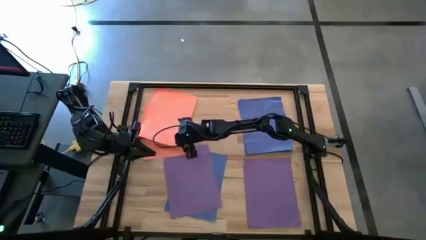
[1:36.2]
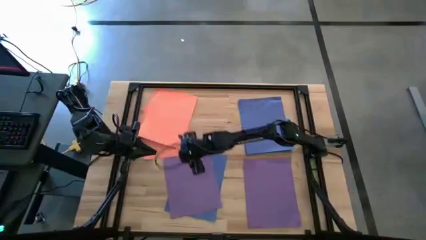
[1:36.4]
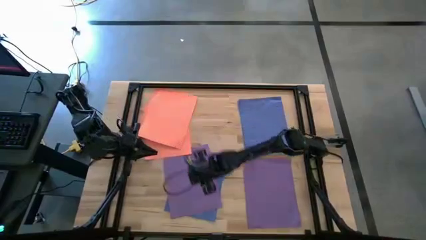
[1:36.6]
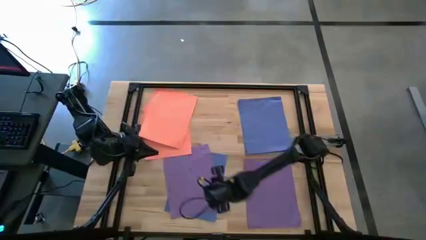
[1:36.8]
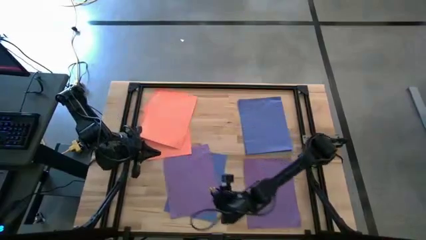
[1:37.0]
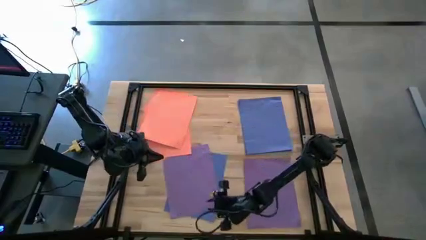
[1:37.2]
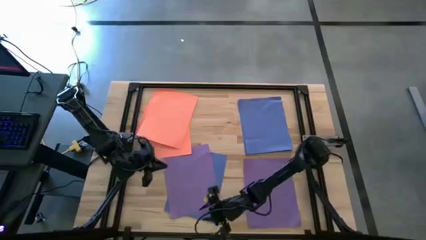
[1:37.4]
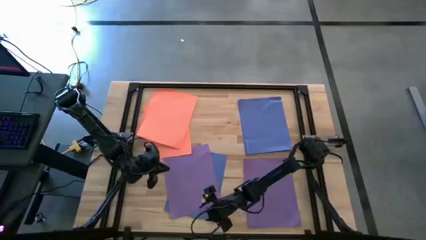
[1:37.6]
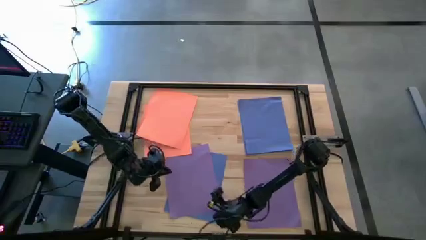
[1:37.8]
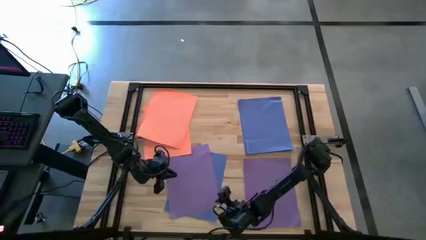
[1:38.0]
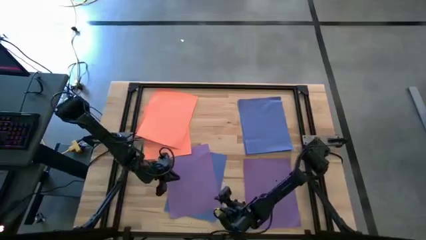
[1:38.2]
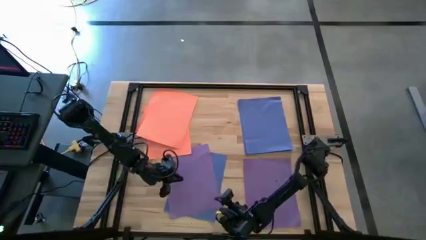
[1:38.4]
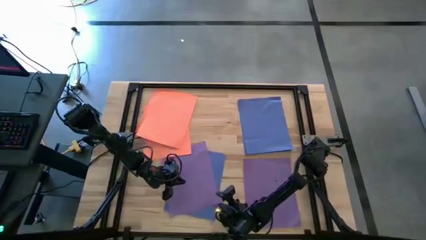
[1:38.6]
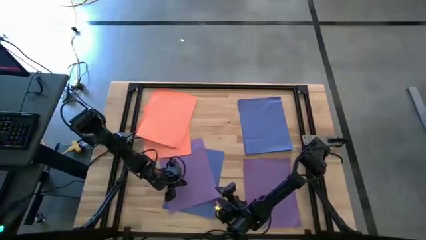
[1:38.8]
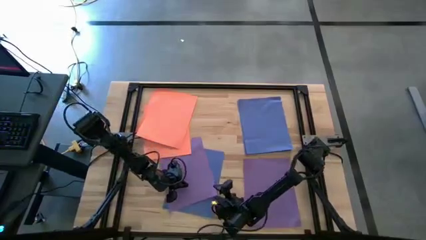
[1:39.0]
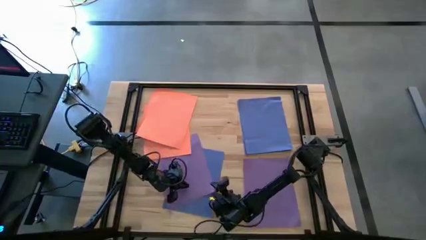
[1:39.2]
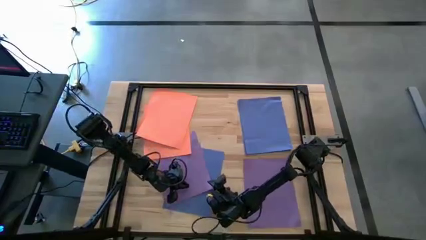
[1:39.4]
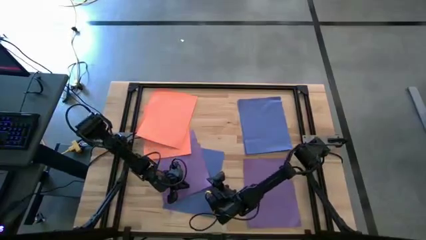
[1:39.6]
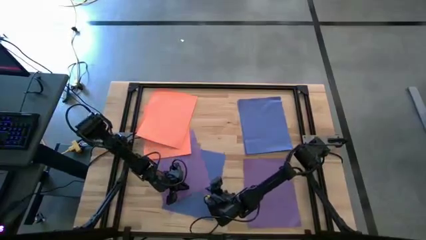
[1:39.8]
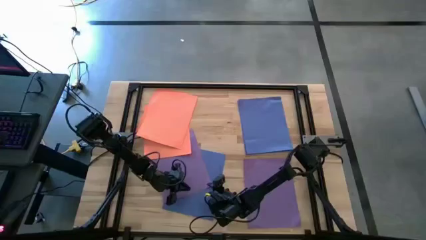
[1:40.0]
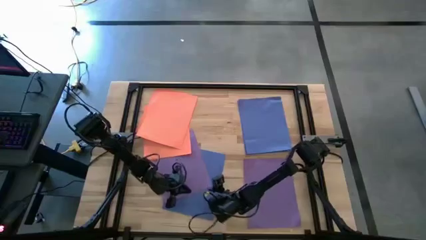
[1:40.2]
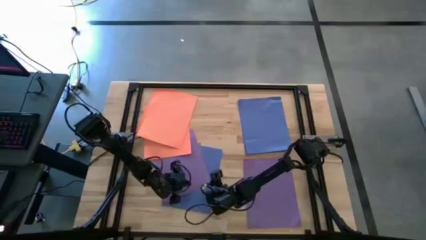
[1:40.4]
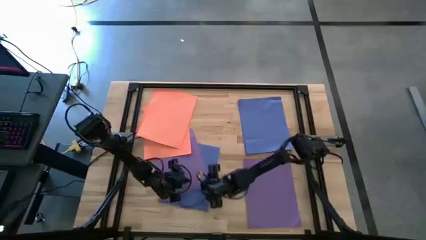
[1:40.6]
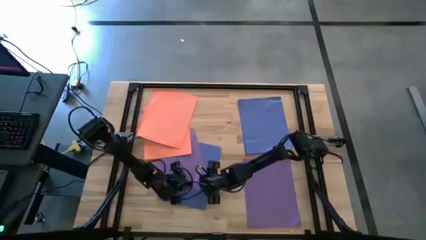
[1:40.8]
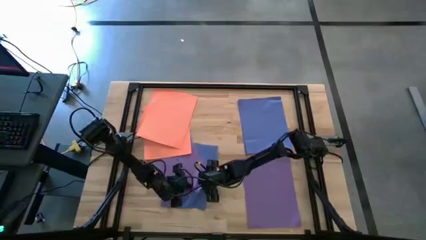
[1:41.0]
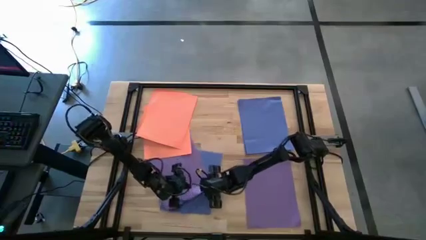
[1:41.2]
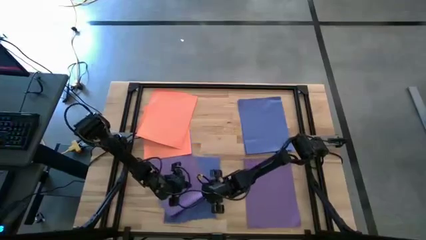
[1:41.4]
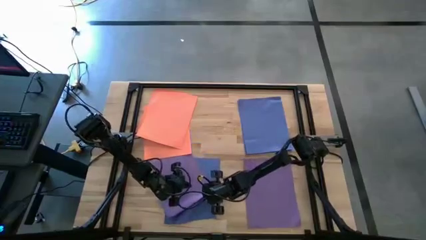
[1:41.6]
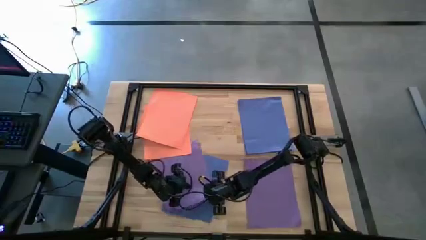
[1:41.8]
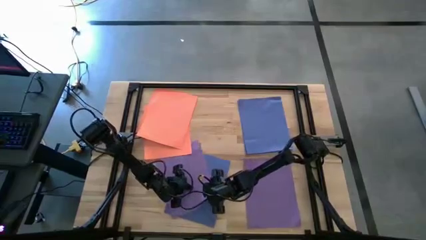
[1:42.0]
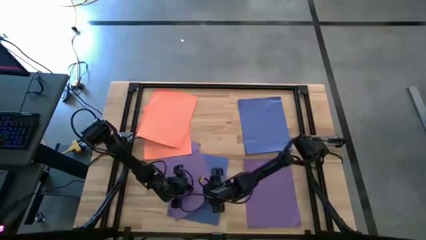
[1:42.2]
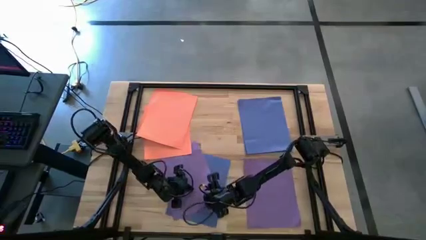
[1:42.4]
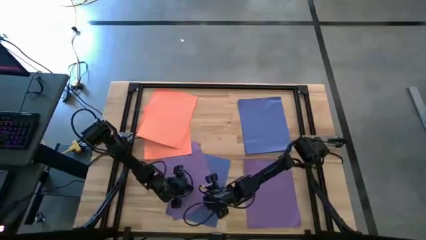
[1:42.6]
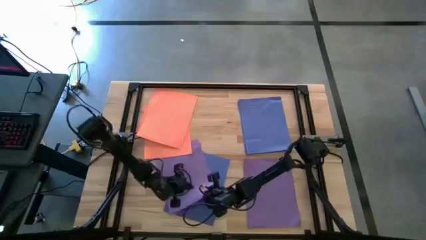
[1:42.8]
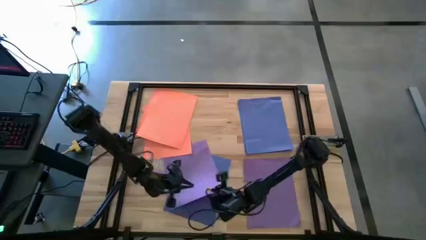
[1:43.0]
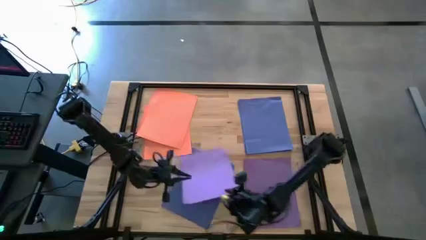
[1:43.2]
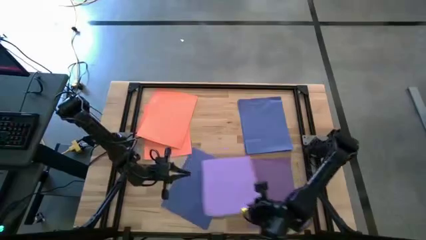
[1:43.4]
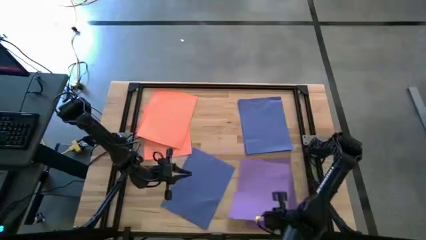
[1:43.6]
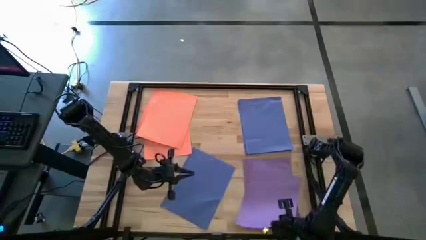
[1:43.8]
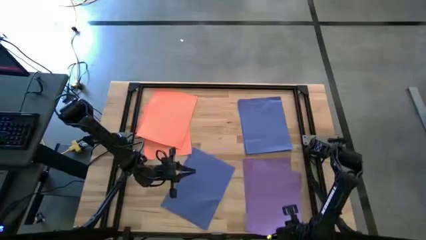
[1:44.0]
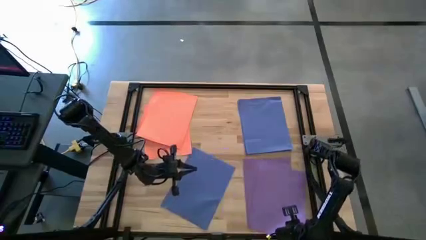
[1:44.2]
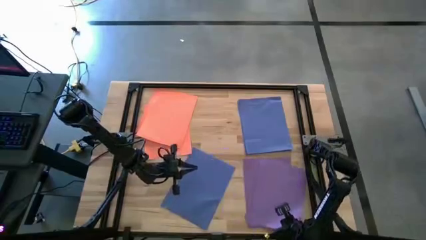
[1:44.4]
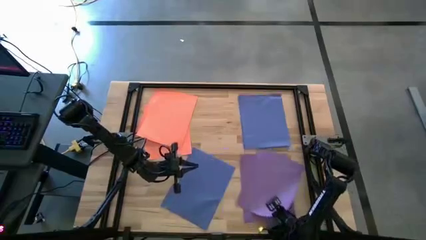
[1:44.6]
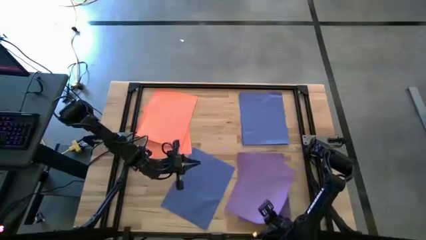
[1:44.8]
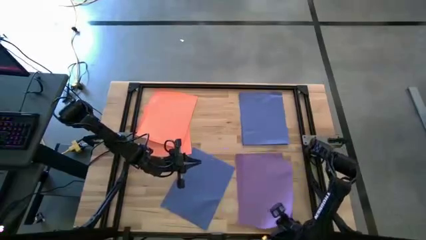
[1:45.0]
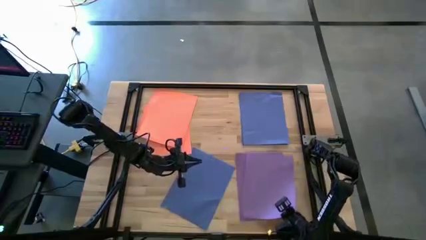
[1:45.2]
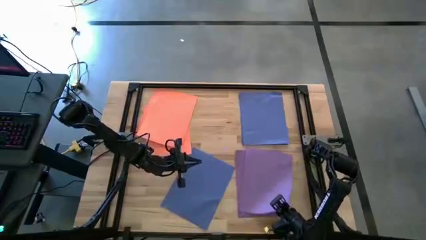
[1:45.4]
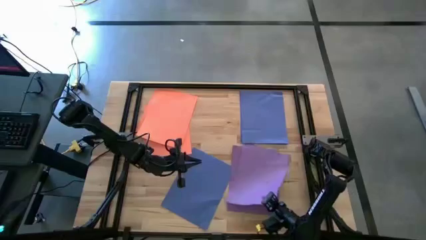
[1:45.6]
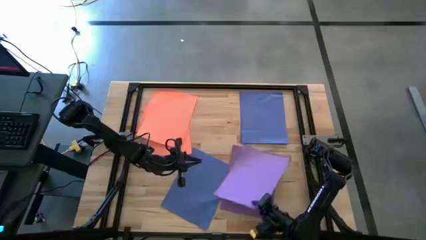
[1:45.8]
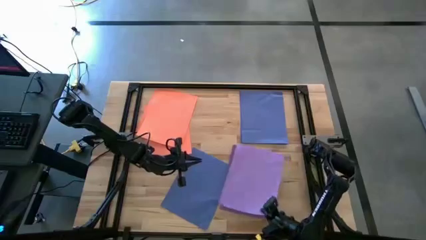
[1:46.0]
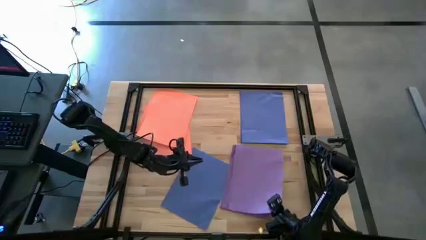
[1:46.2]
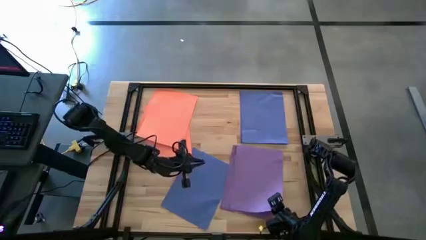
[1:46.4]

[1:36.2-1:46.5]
Task: Organize paper
Stack the purple paper on top of the purple paper

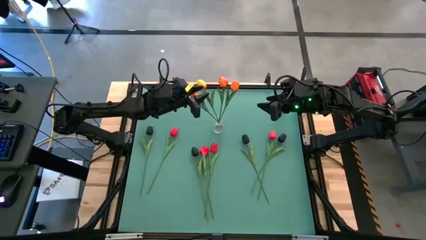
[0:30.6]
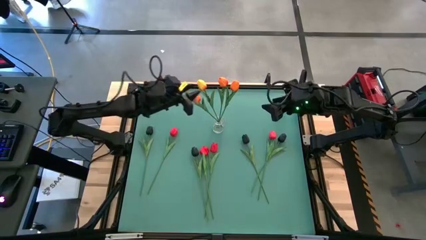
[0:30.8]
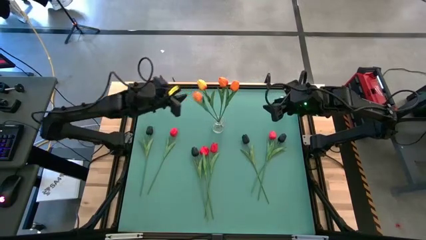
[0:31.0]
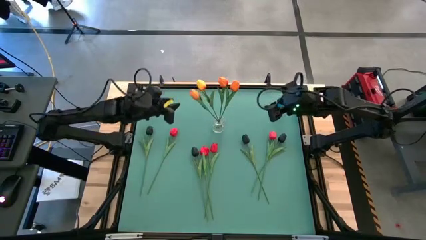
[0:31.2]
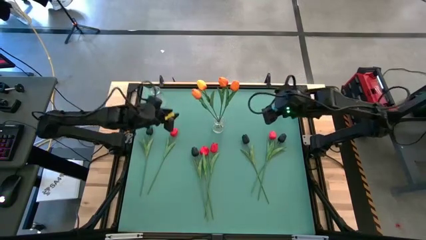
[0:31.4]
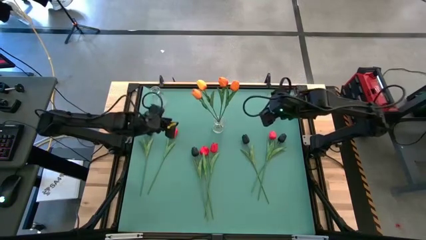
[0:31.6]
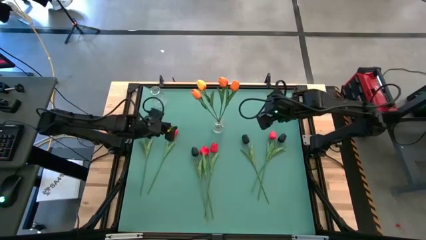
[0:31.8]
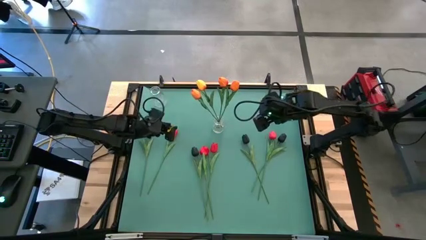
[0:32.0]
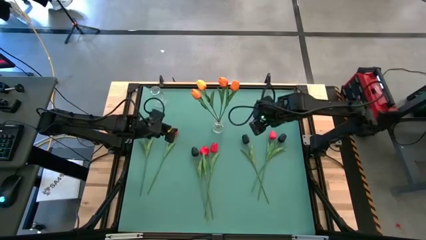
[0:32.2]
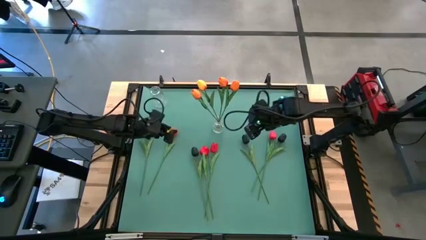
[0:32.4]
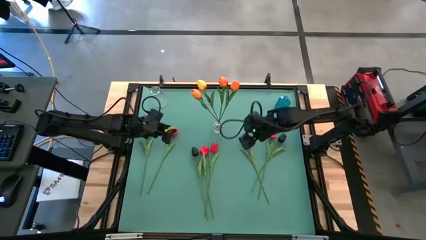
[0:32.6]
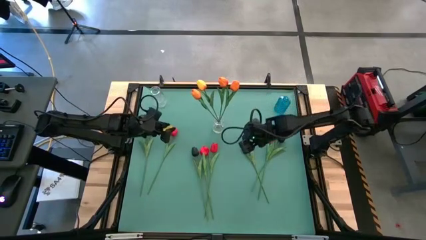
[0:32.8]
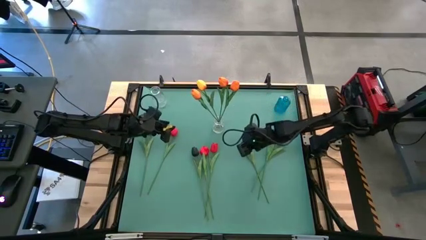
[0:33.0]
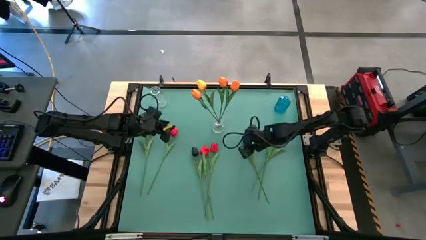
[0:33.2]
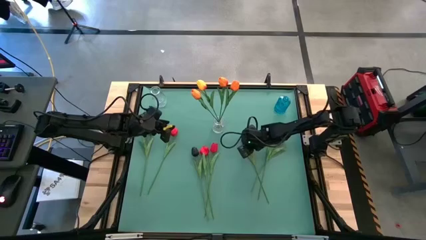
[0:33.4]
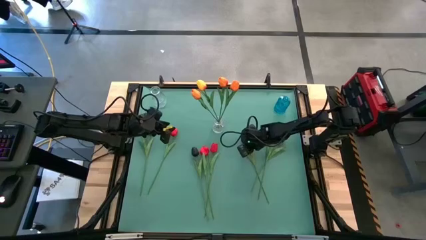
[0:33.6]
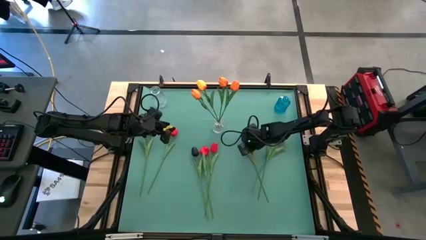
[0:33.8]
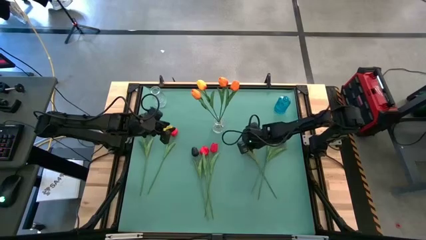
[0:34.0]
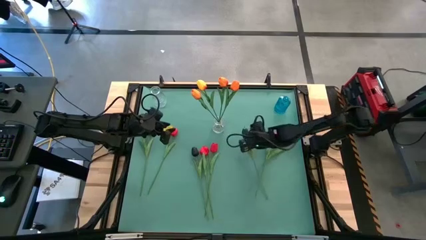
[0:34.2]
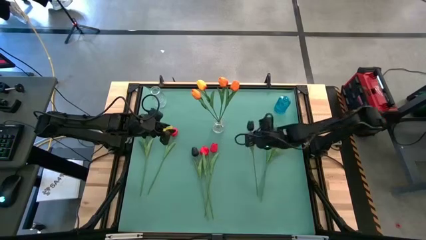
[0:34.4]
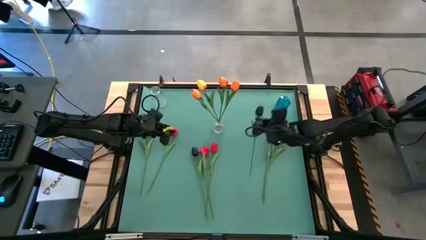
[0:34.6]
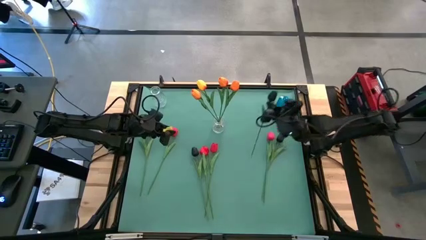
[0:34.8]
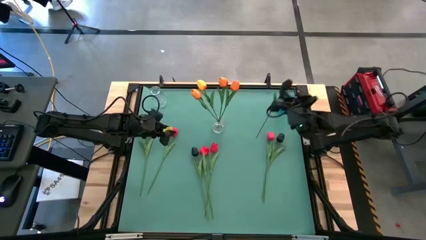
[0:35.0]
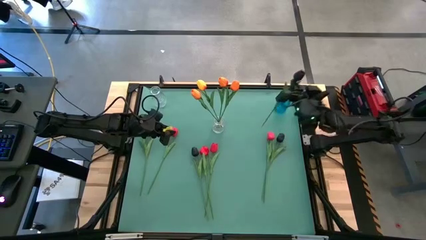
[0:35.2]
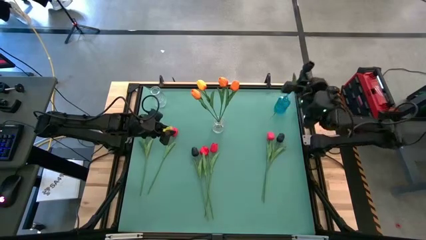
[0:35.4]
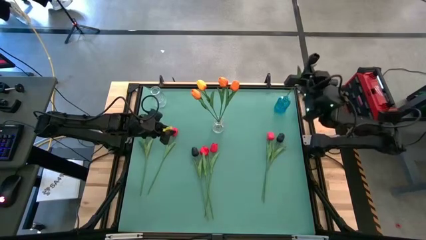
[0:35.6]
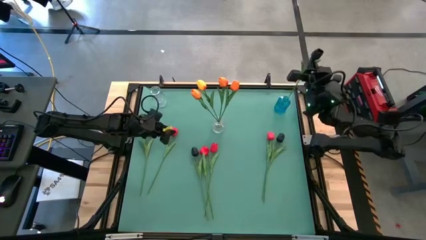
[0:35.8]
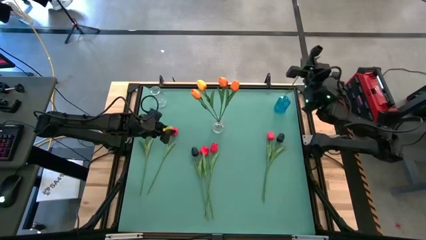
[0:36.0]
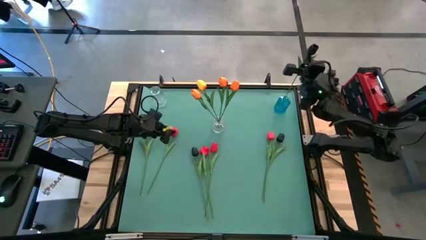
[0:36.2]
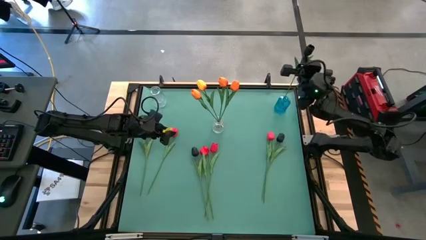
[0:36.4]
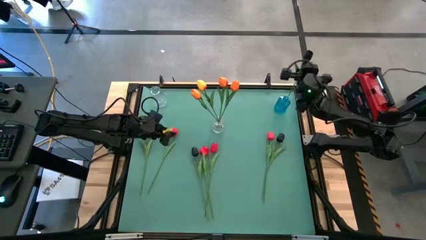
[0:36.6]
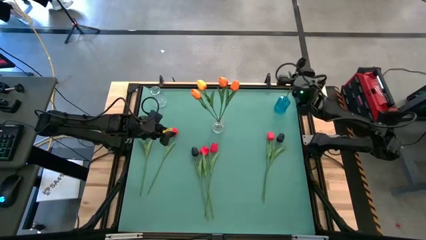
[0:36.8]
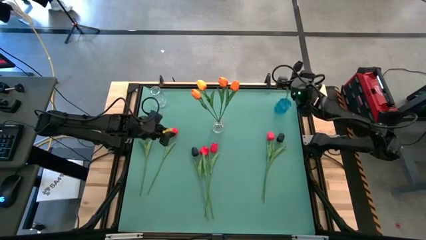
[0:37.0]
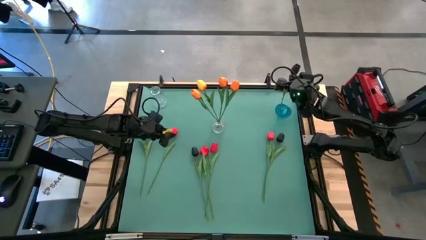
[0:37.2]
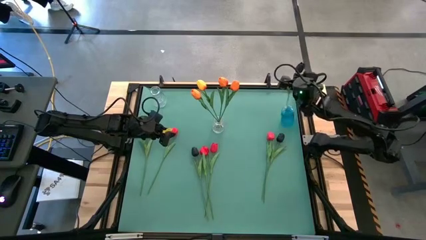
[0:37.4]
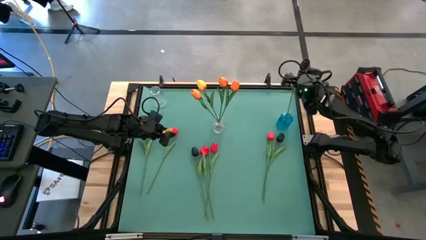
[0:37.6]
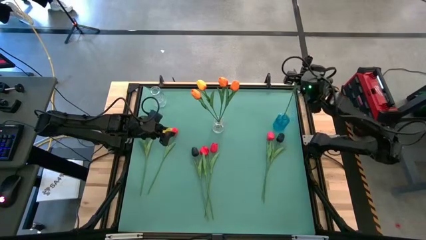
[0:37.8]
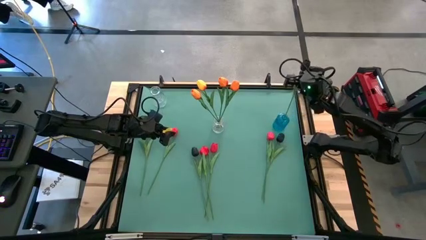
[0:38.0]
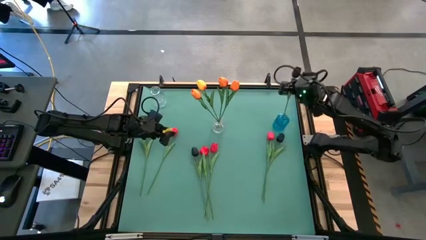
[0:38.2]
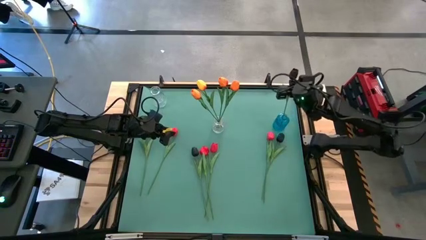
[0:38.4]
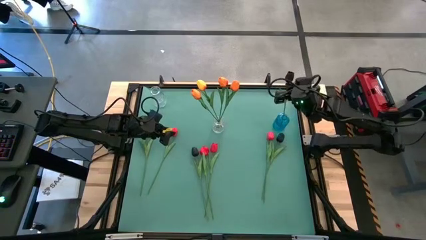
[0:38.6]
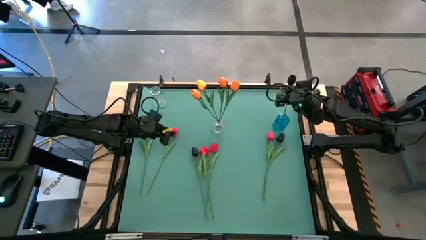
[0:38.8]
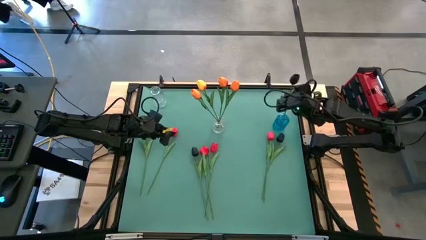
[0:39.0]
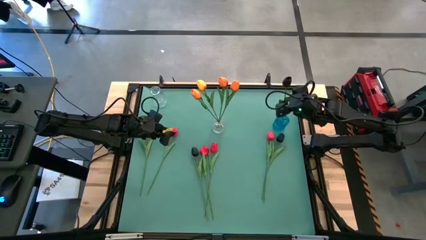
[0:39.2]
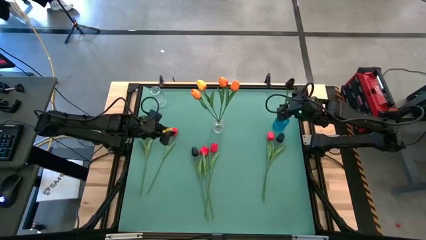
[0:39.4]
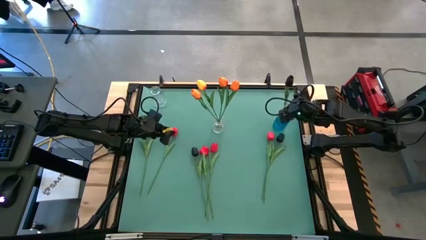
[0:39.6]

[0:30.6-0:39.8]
Task: Sort flowers into vase by color
Put the black tulip into the blue vase
